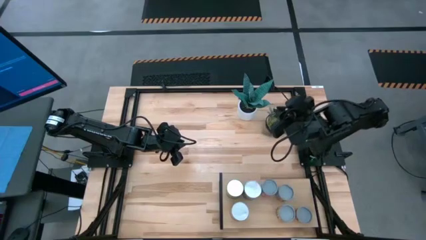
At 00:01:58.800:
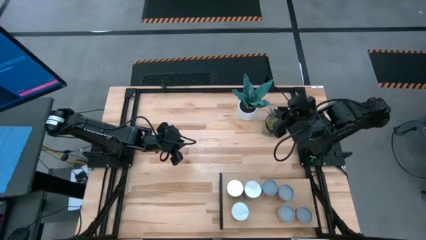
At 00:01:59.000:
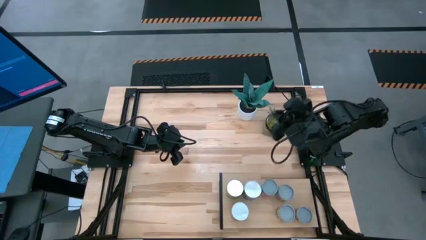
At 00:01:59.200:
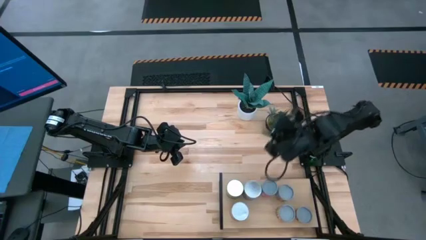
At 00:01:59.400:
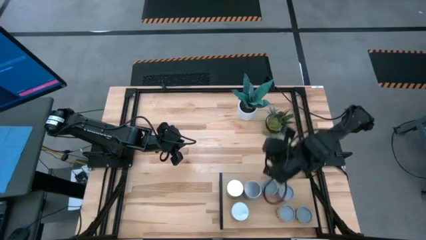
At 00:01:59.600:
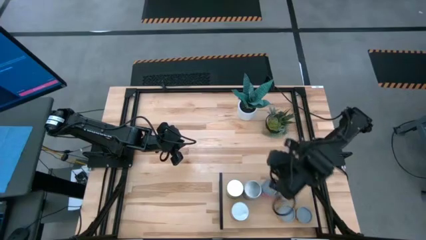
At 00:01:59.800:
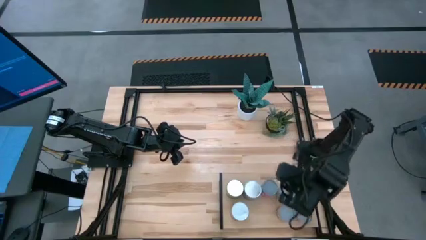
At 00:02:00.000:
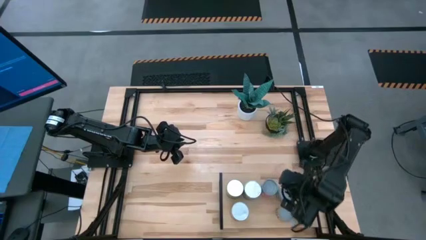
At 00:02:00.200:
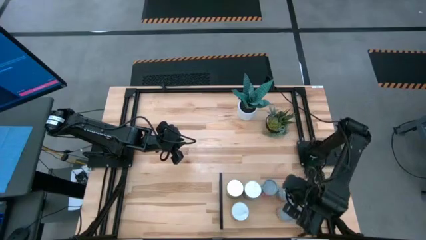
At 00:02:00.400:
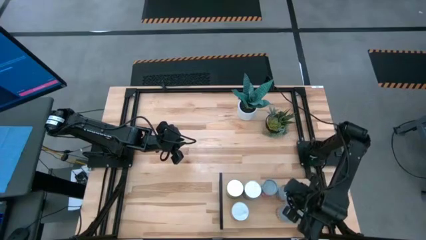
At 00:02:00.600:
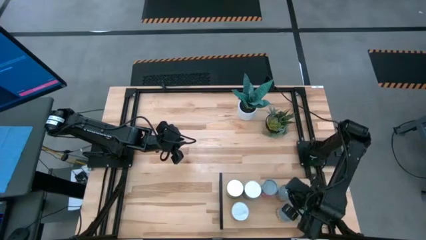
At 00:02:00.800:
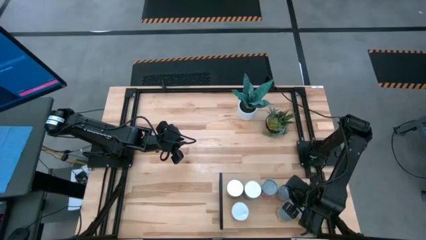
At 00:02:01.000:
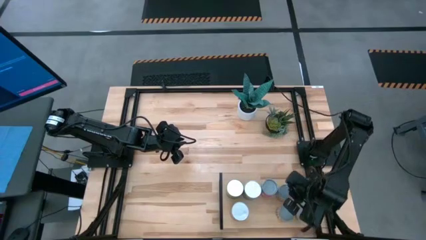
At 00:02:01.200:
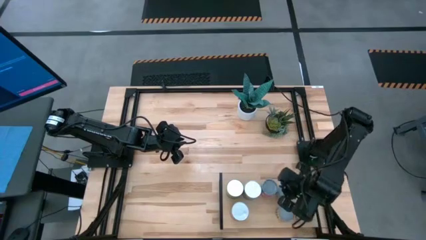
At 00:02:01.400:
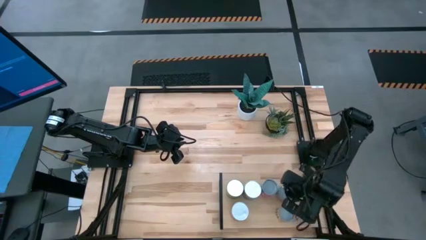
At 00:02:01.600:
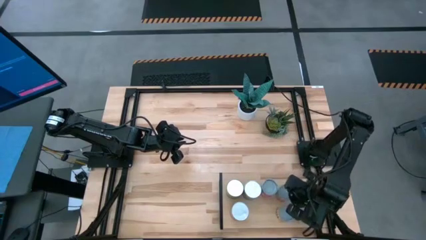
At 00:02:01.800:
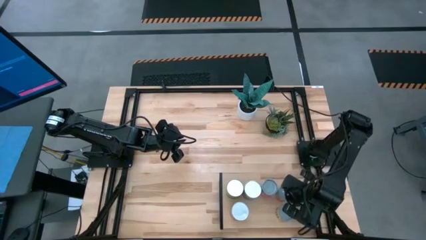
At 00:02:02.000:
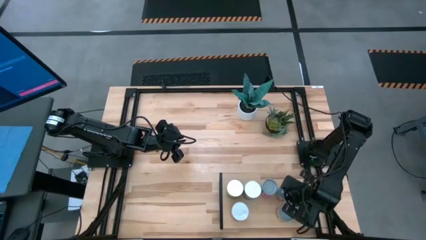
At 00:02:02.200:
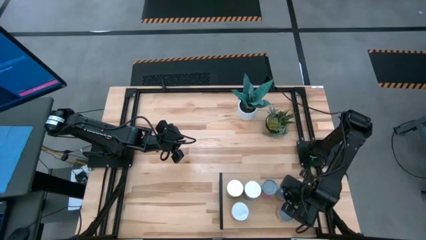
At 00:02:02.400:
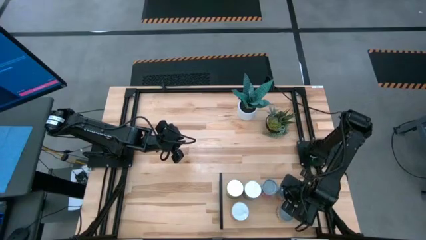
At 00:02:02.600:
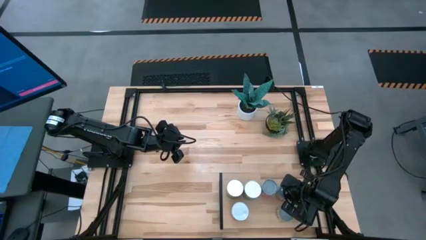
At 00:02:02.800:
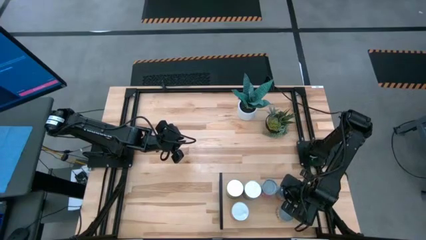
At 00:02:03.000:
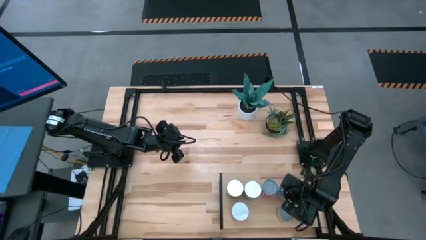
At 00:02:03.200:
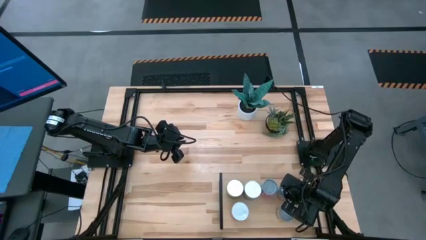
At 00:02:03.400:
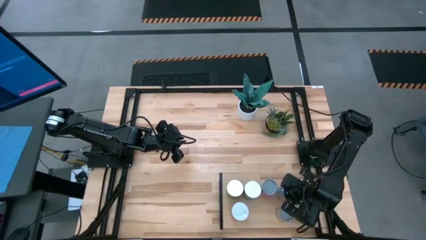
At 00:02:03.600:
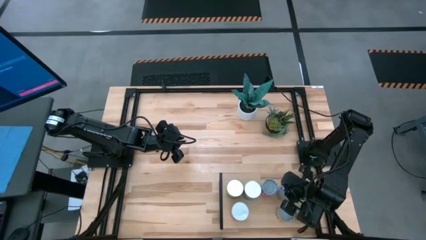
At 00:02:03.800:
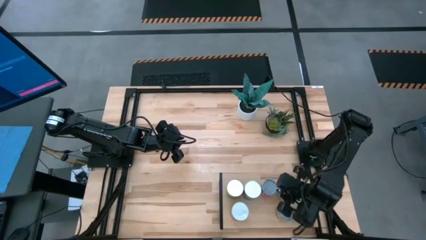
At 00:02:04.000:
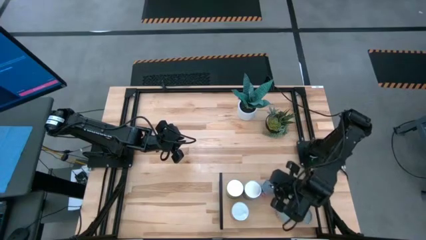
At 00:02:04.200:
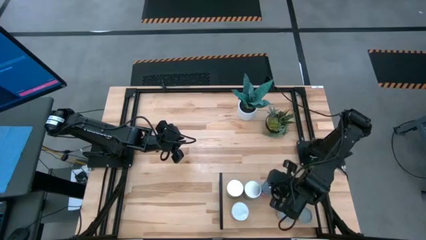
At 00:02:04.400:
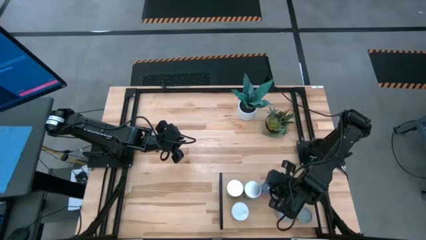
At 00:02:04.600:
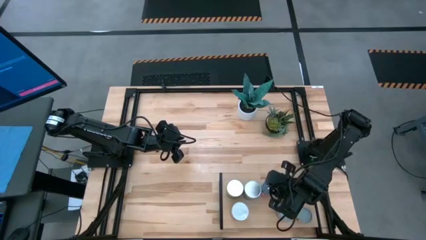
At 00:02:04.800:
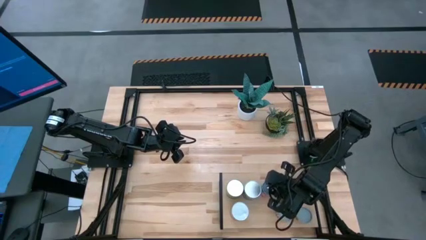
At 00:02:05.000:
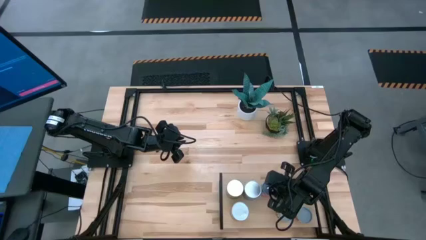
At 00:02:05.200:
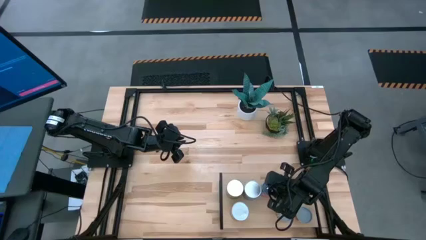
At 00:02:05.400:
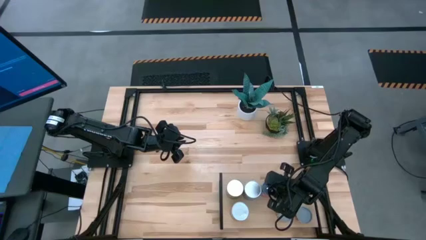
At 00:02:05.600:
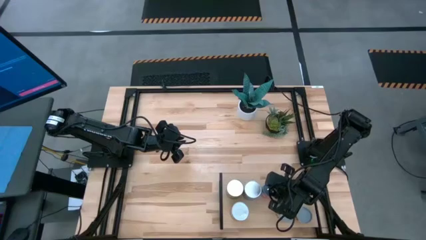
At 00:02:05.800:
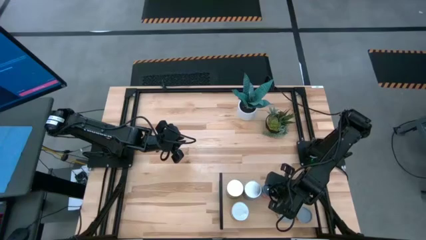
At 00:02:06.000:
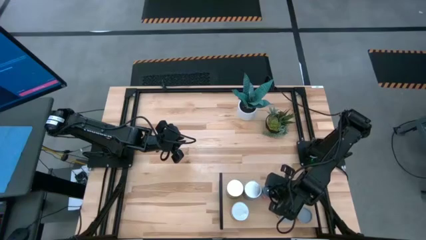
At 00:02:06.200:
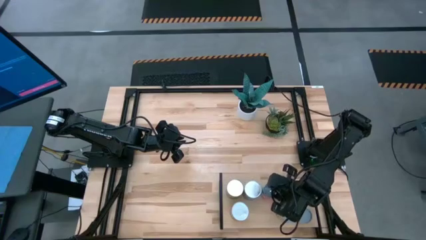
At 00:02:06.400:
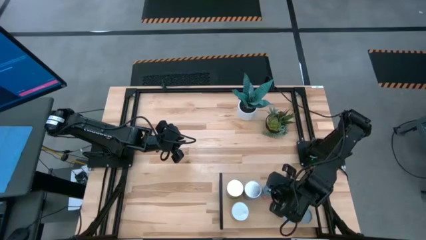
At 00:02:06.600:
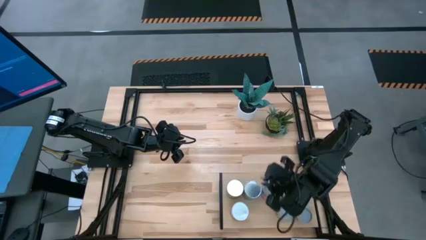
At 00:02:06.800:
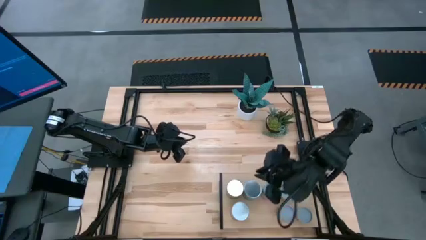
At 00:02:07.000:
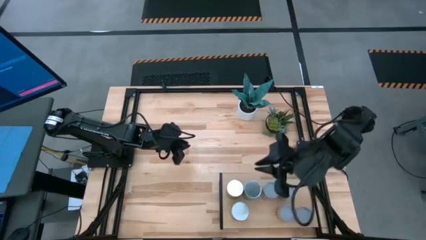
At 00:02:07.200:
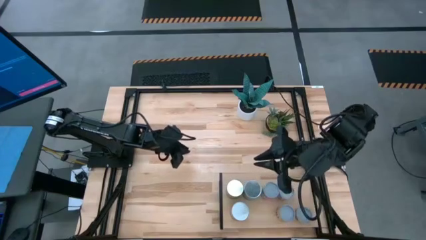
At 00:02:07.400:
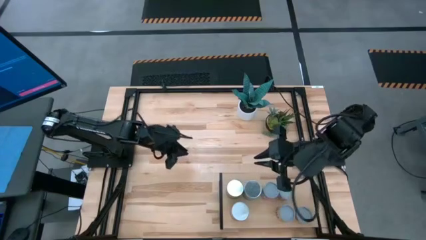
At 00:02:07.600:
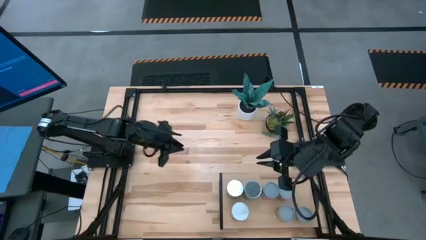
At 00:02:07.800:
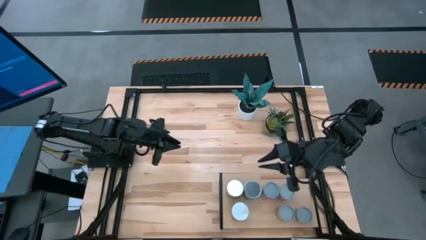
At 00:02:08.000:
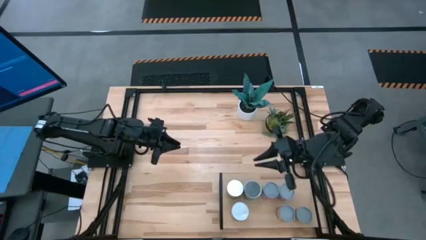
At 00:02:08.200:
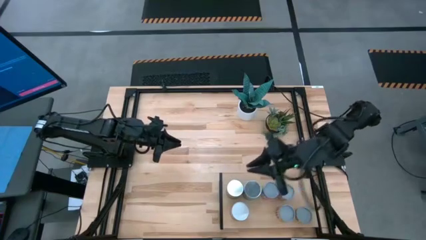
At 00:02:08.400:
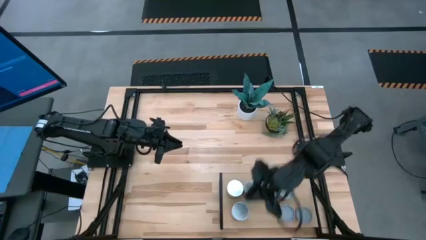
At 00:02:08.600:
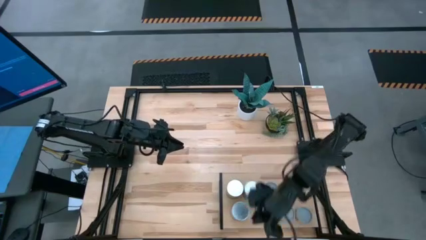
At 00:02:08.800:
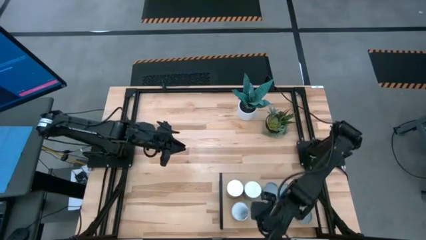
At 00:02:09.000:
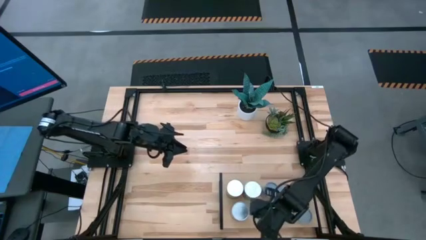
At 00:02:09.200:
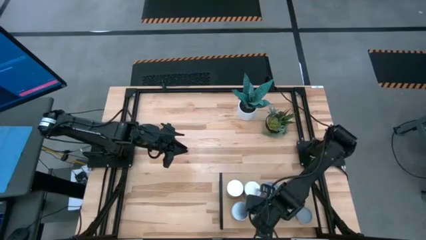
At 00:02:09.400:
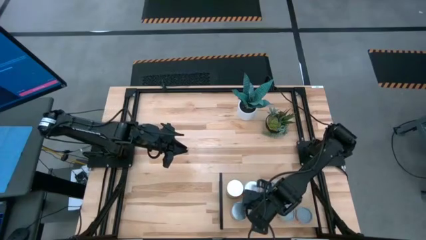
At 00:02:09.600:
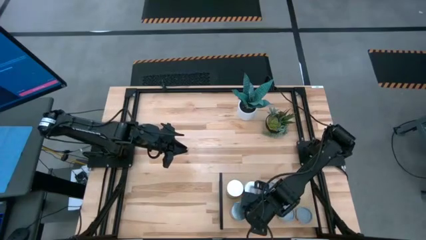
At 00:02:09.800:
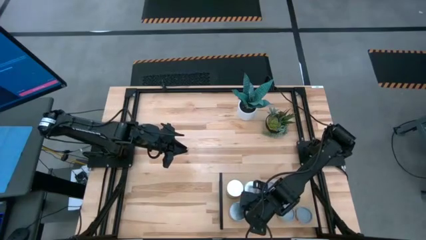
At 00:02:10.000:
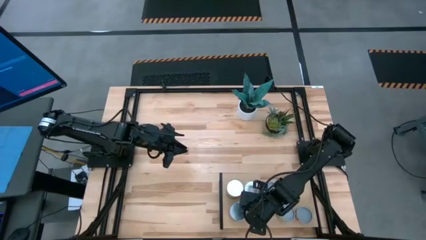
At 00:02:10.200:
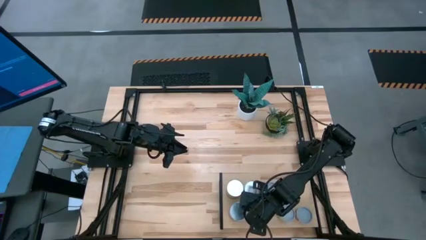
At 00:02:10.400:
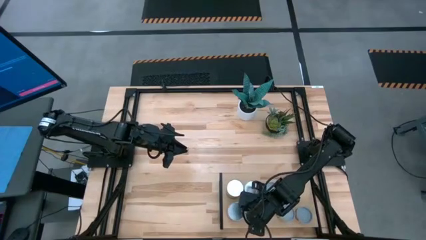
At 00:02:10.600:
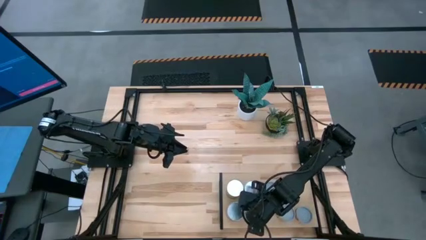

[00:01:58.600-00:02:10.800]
Task: Pick and place cans onto a shelf
Adjust the cans on the shelf

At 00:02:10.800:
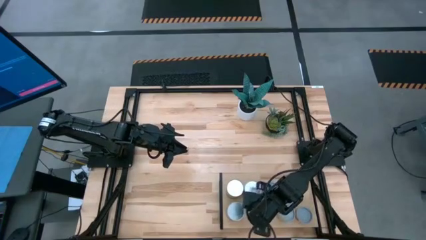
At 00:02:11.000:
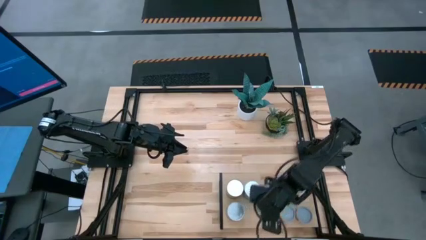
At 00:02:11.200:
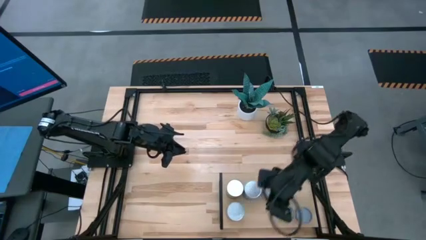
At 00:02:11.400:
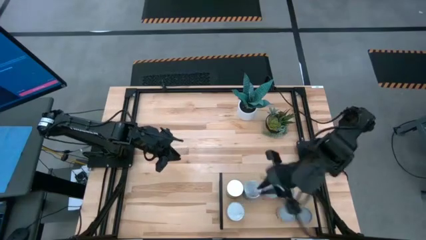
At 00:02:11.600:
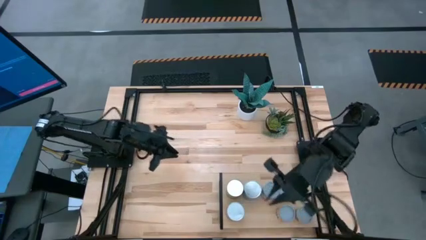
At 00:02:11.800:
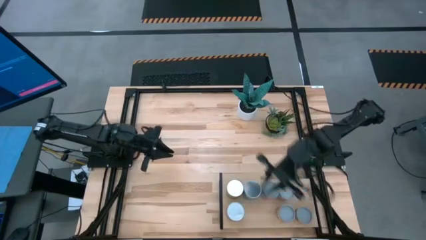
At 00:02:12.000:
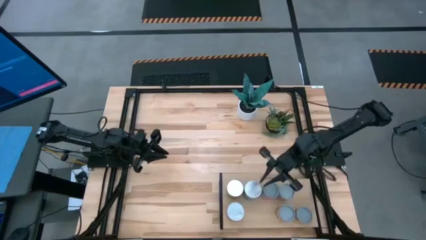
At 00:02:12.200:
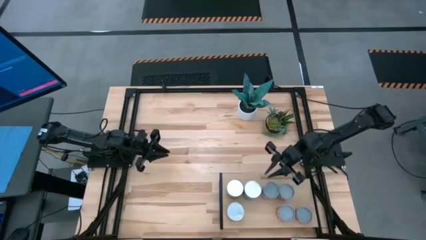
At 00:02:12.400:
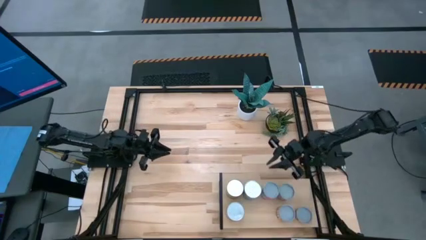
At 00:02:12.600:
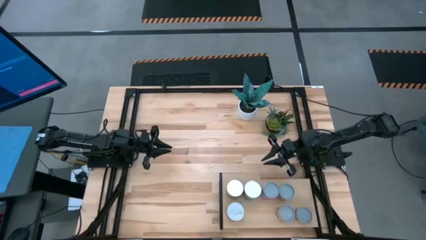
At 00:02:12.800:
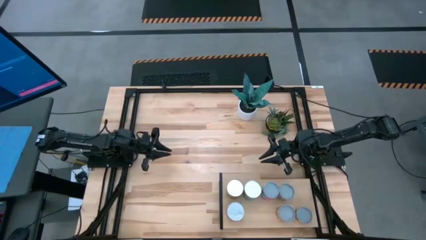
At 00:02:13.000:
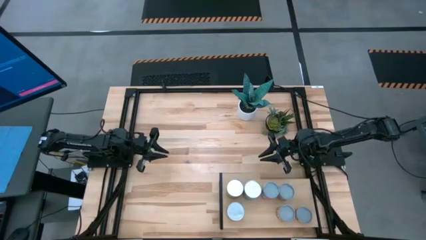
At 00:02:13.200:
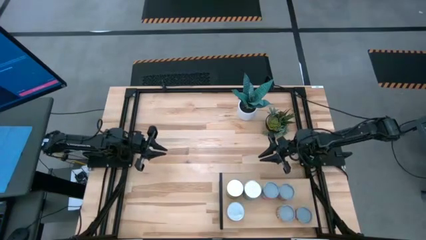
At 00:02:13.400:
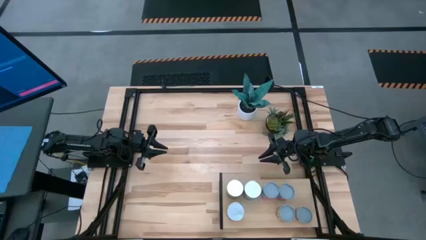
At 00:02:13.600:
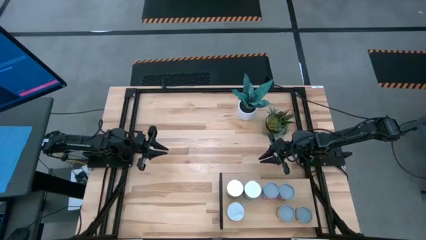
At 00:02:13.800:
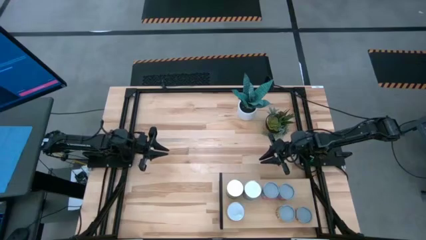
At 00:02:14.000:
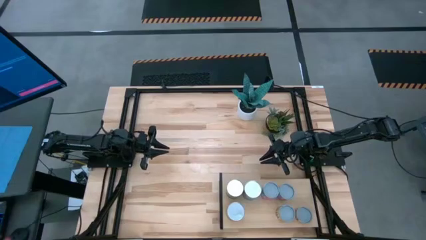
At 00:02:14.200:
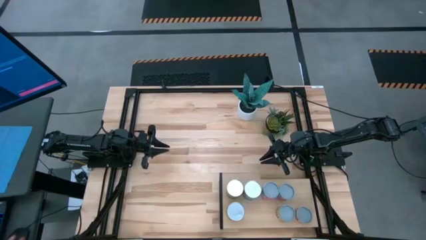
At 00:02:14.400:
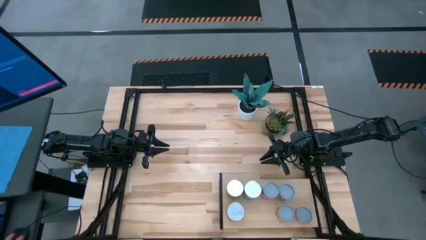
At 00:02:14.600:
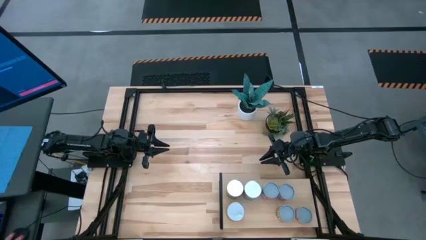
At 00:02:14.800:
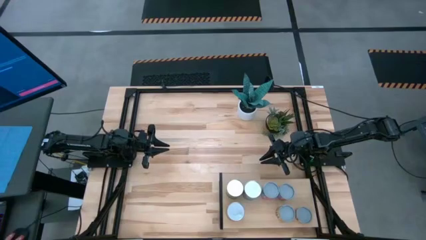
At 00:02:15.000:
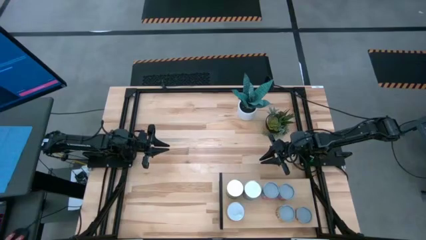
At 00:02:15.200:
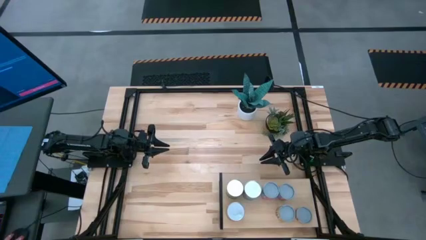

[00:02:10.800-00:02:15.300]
Return to Home Position
